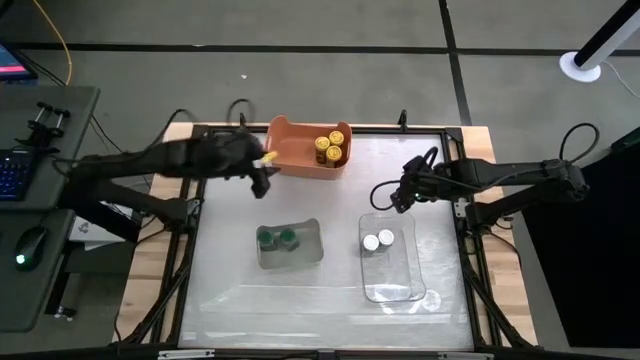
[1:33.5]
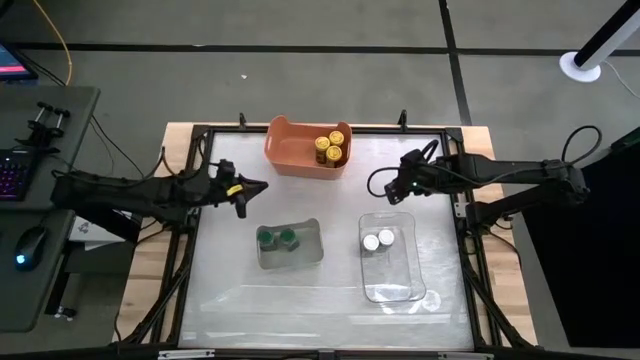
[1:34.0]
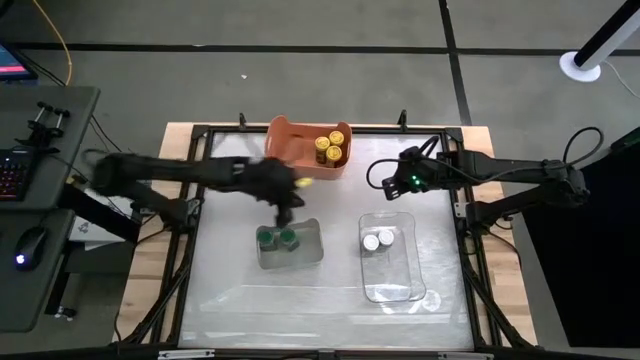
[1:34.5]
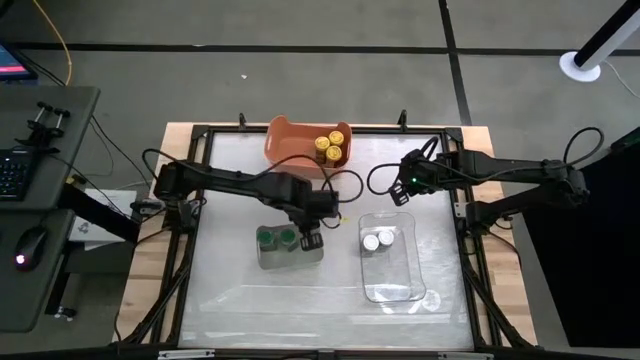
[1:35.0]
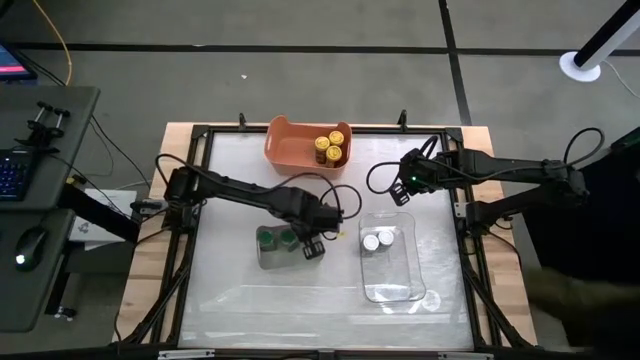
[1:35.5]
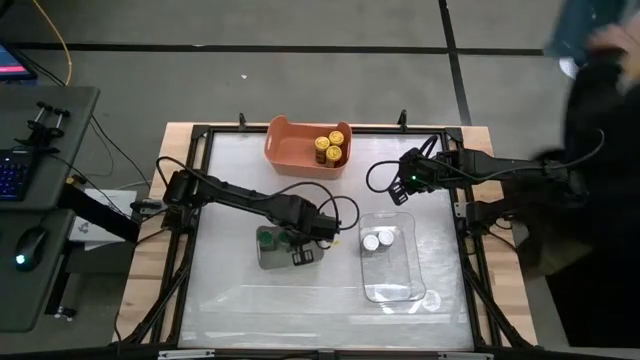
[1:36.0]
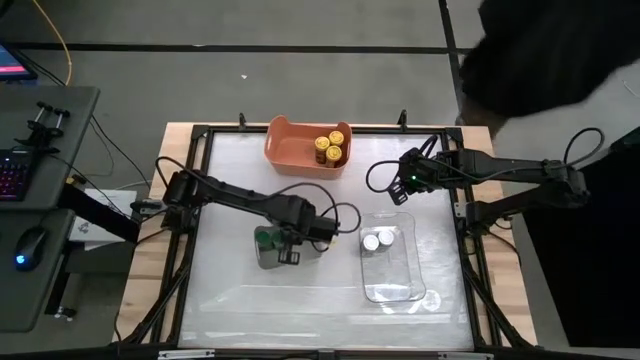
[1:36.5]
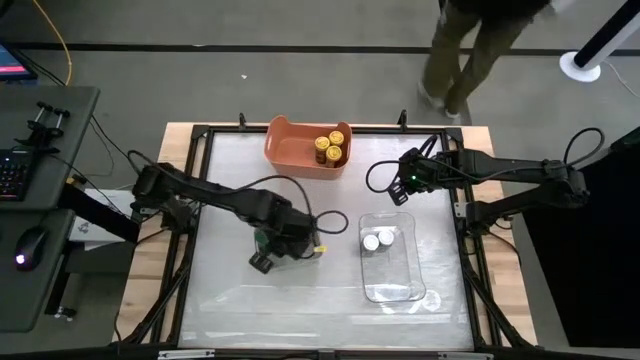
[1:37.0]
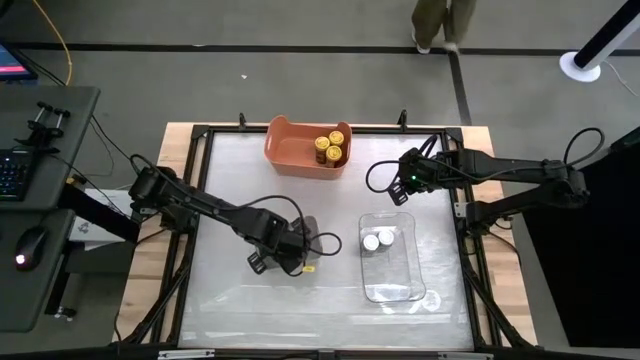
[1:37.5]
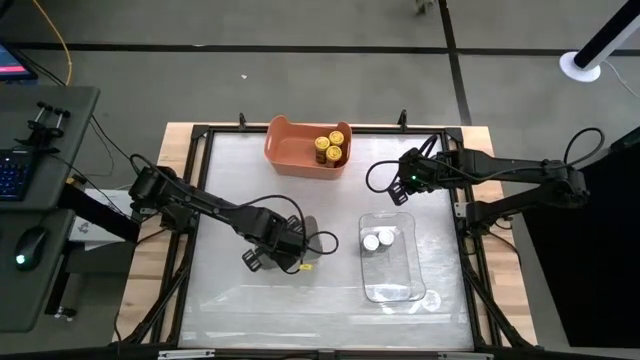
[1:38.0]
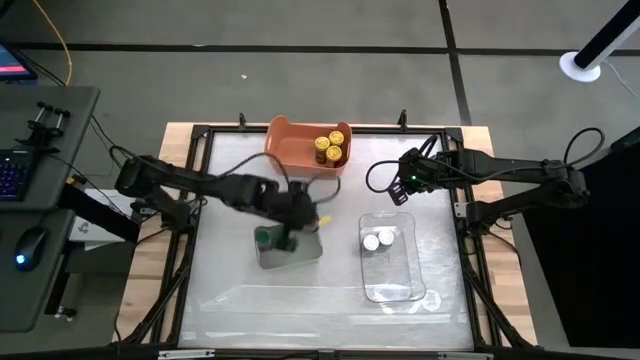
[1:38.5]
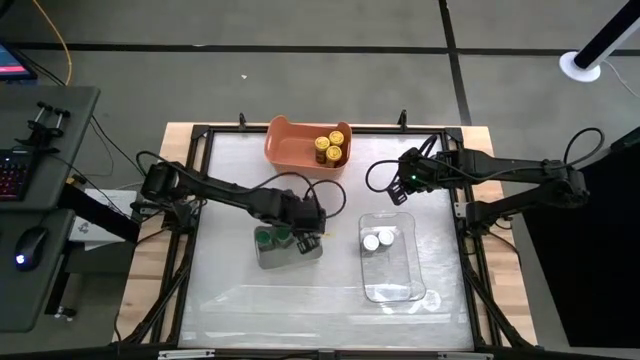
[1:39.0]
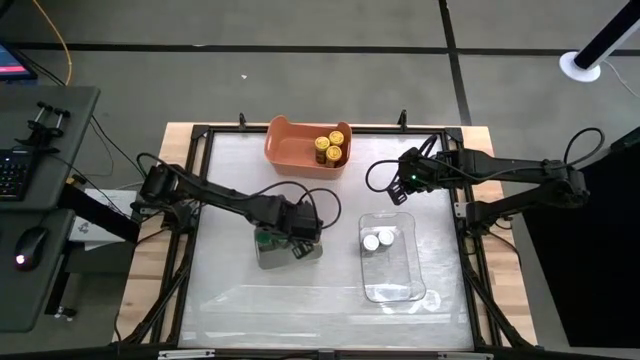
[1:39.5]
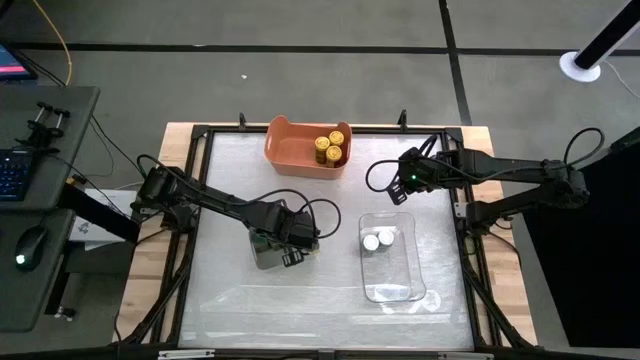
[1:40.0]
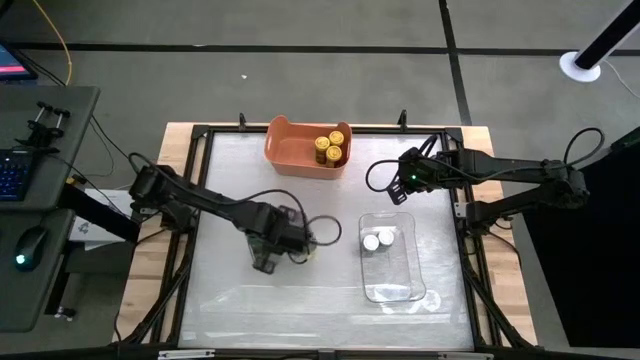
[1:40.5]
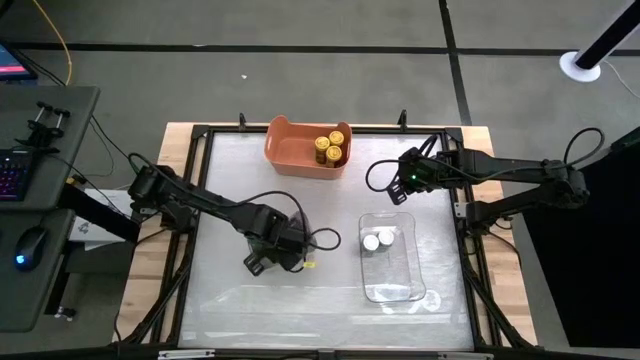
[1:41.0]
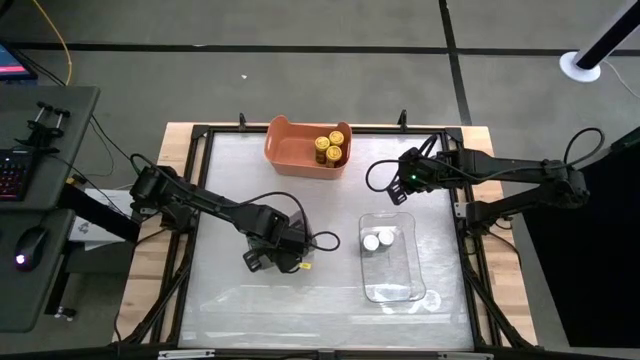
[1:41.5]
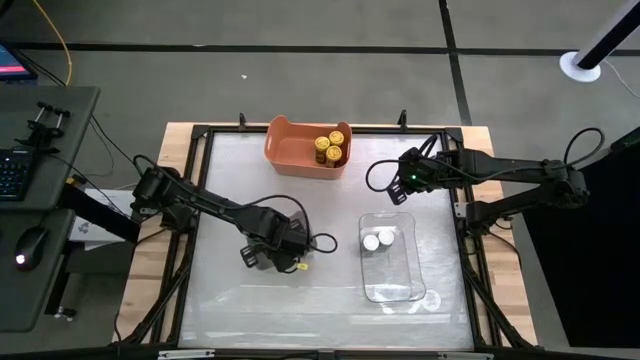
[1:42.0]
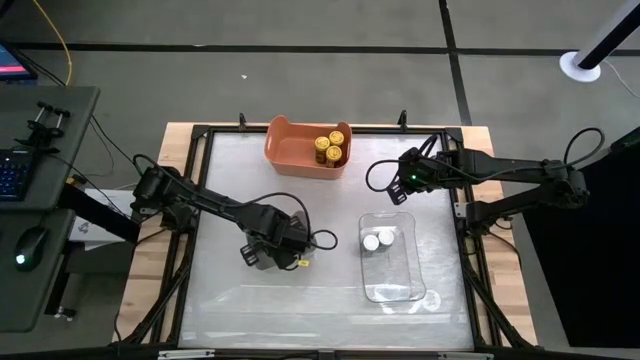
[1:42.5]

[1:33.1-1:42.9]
Task: Sort spices by type
Adjust the green seasoning bottle in the gray bin

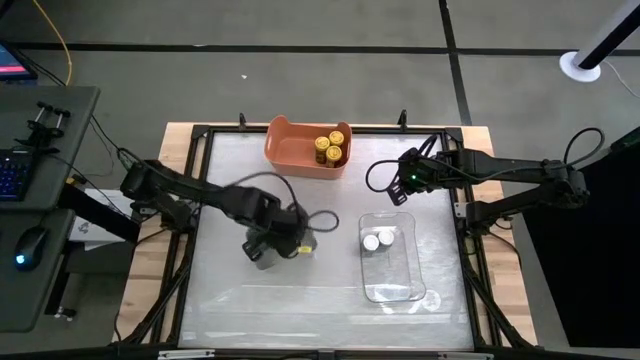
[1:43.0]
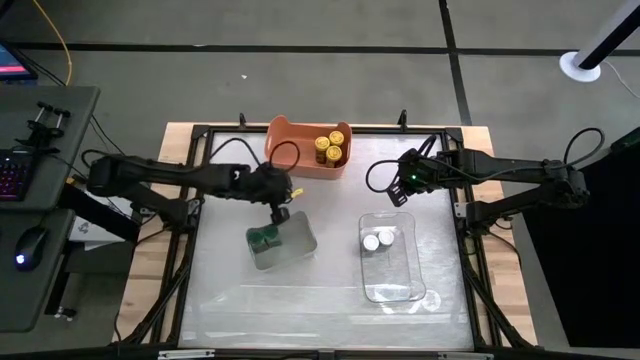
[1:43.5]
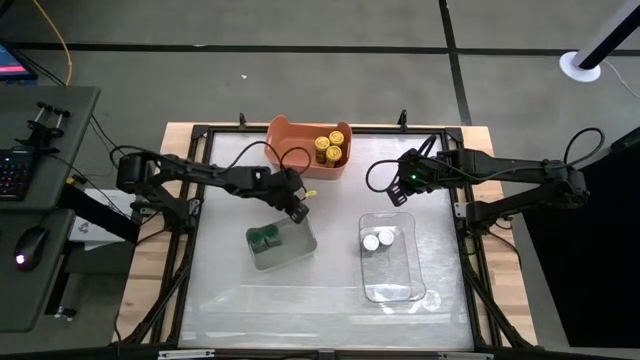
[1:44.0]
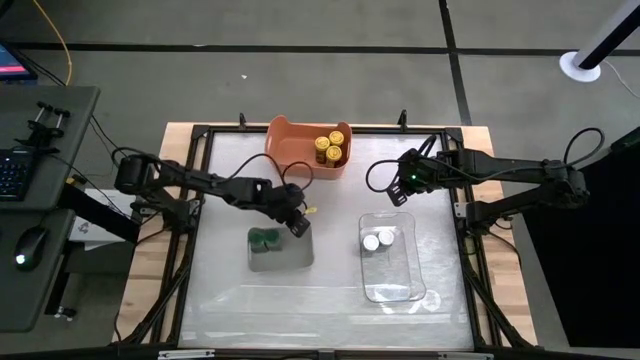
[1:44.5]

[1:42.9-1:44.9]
Adjust the gray bin

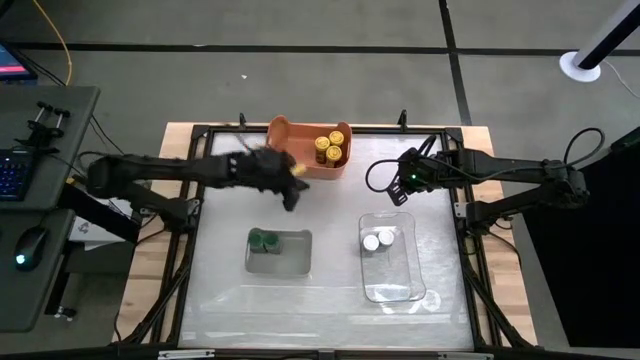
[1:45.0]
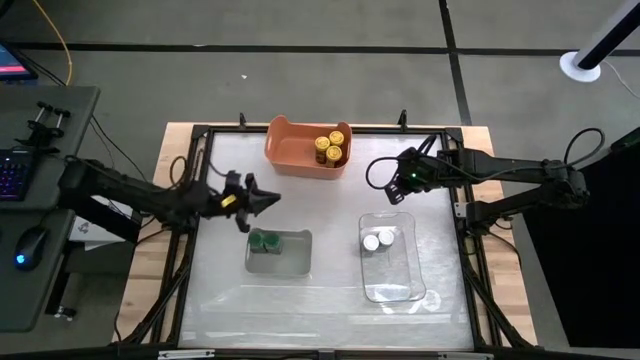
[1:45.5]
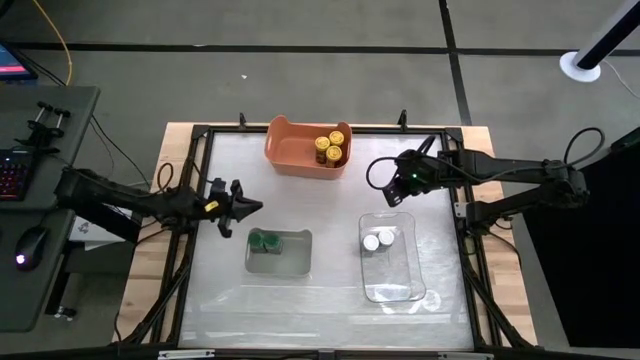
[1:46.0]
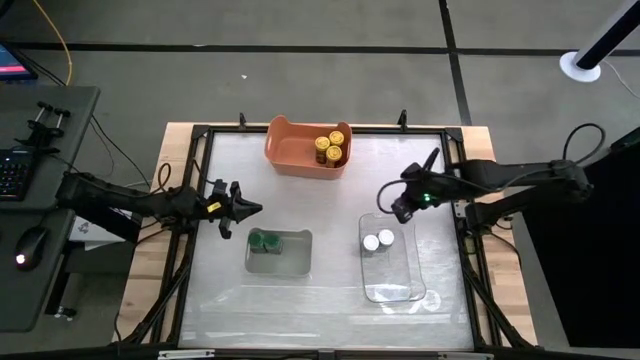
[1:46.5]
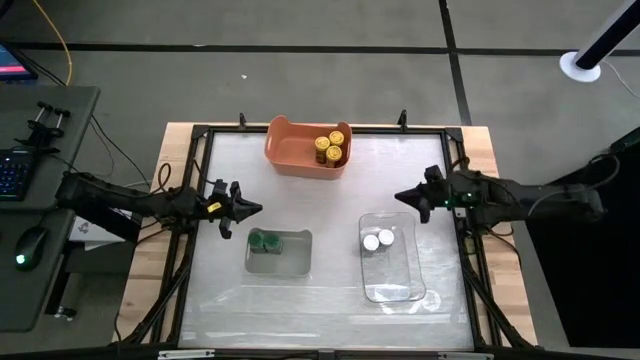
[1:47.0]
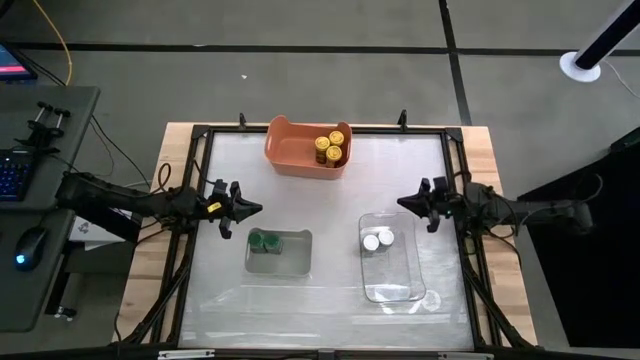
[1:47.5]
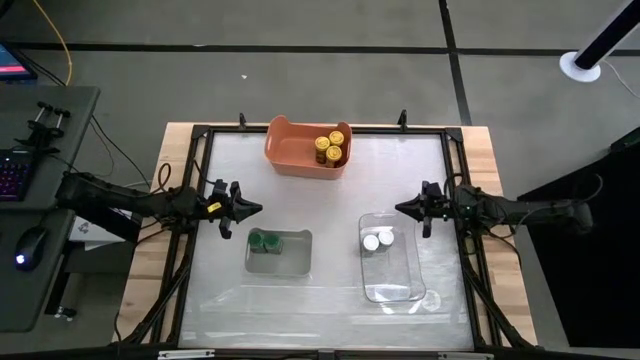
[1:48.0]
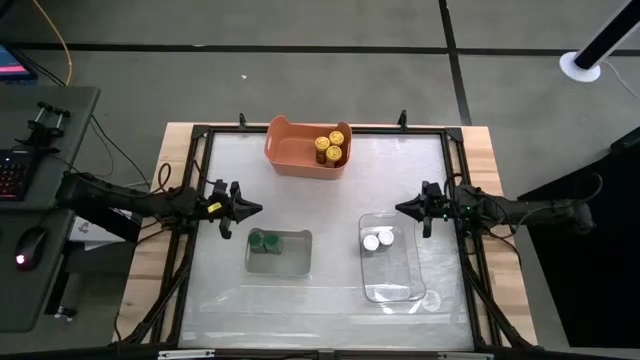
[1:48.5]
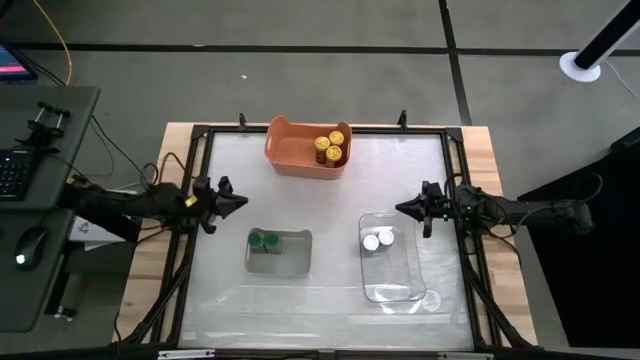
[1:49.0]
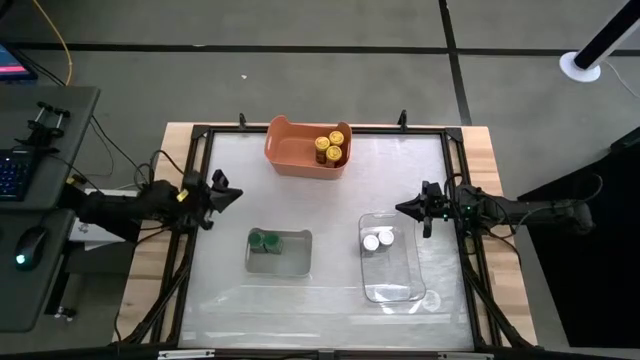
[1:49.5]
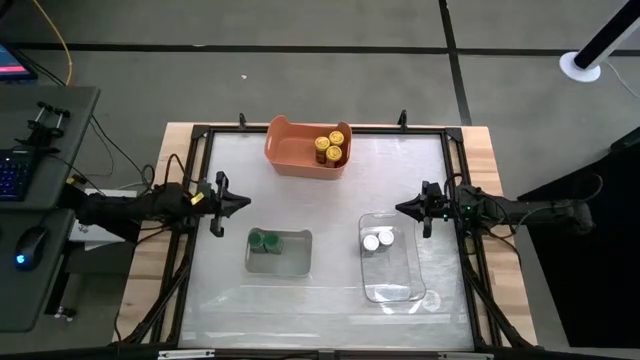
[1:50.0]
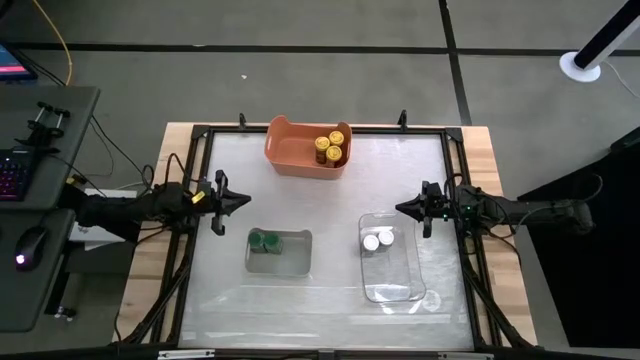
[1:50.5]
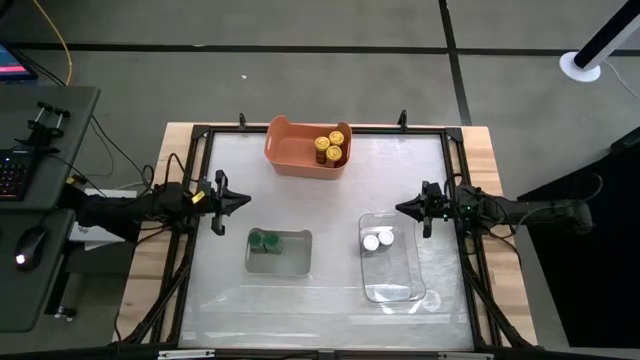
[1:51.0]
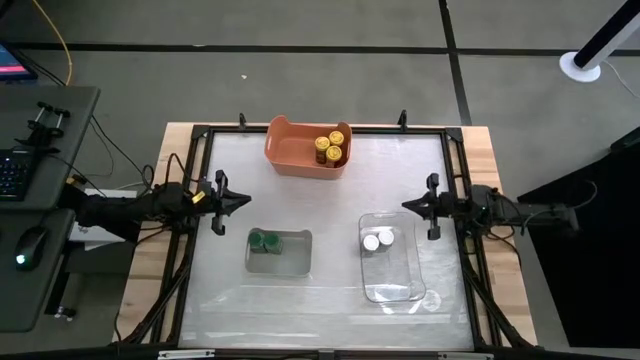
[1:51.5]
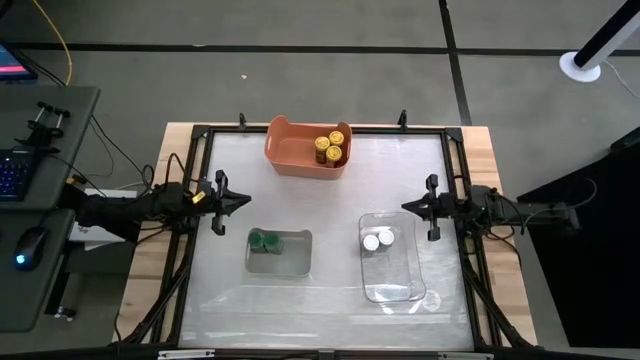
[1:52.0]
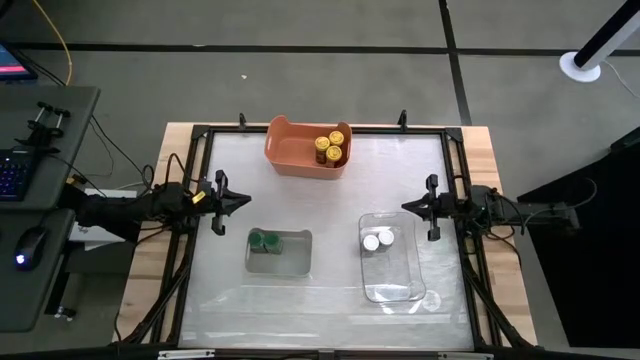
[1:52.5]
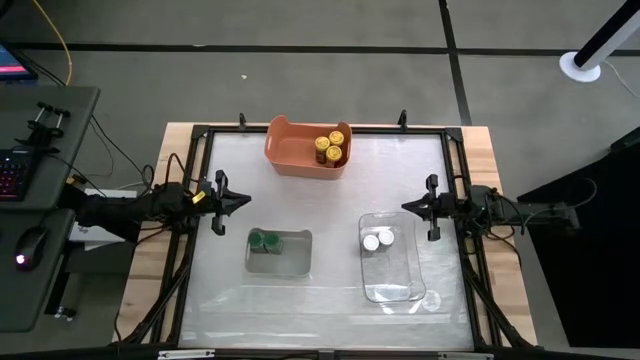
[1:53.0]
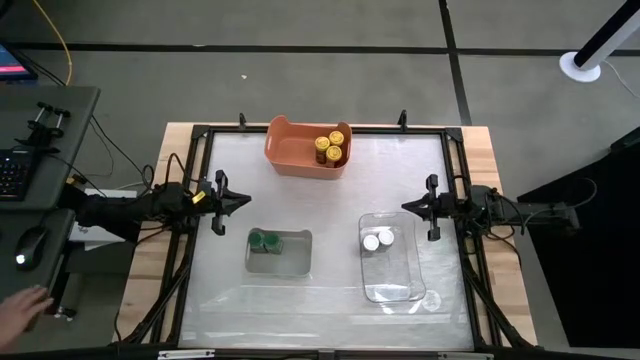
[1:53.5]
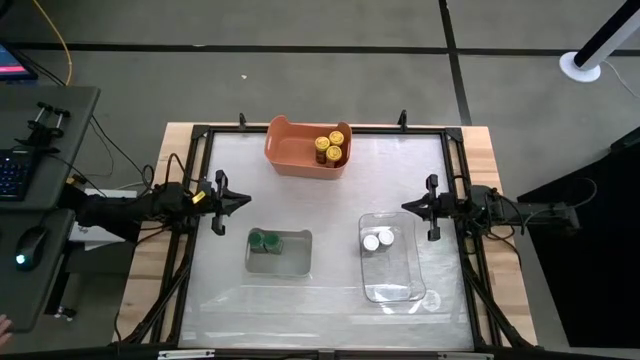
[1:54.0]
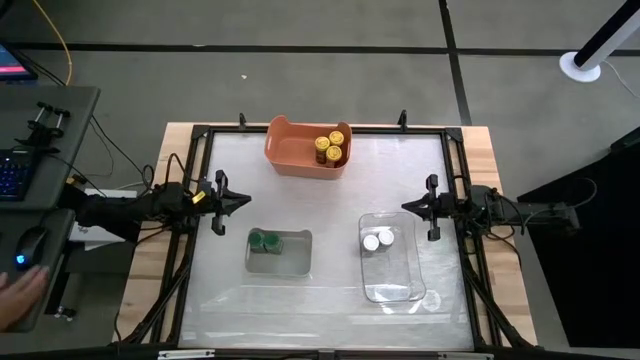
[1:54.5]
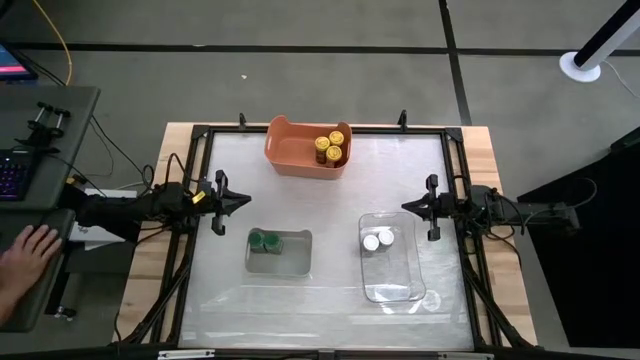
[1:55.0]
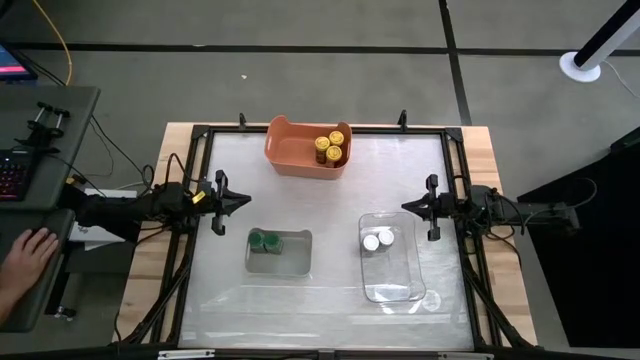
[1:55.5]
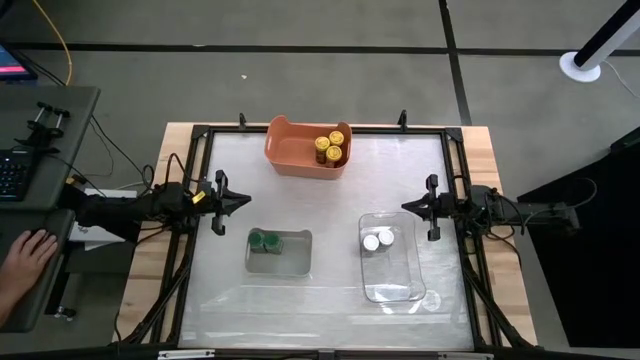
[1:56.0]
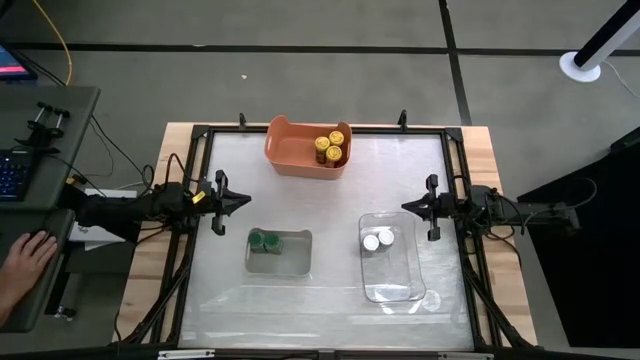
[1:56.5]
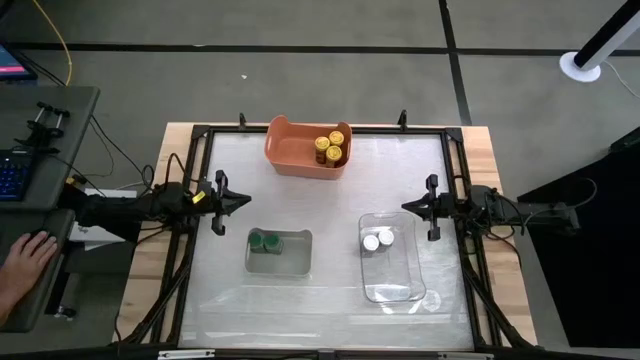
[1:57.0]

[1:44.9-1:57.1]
Return to Home Position
